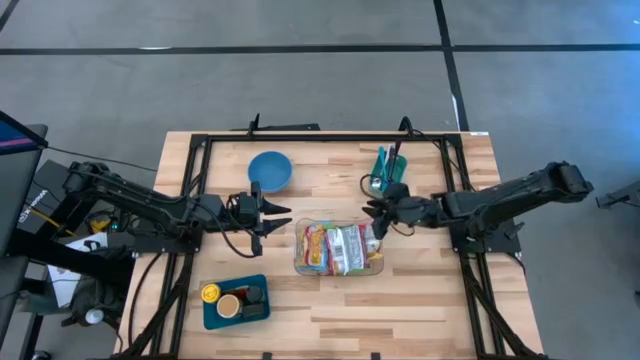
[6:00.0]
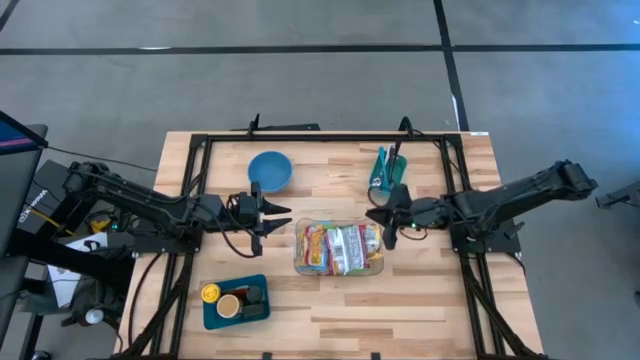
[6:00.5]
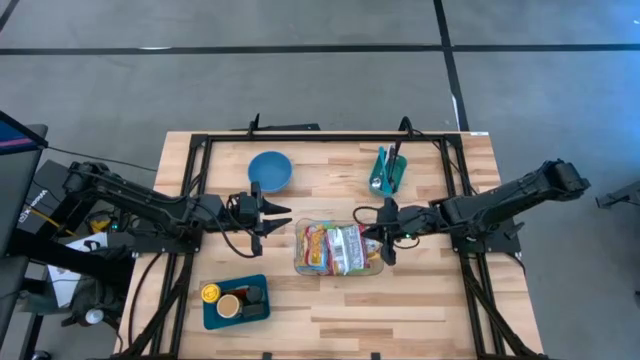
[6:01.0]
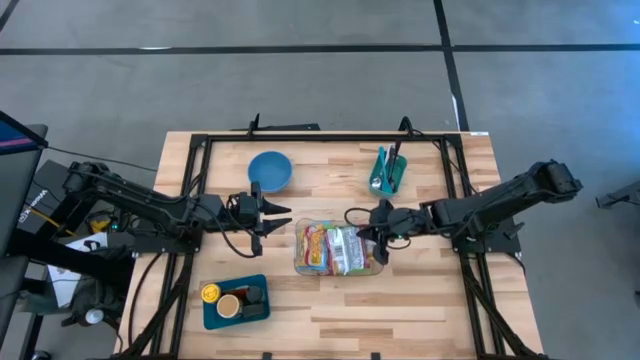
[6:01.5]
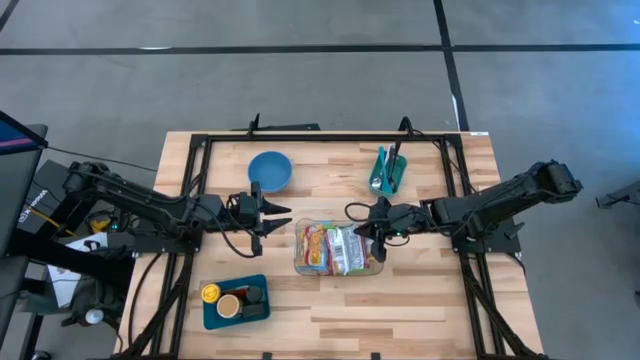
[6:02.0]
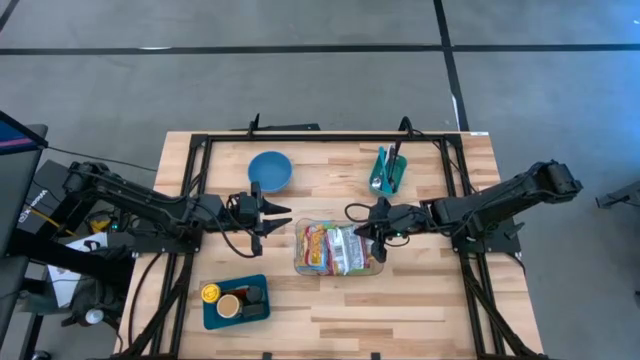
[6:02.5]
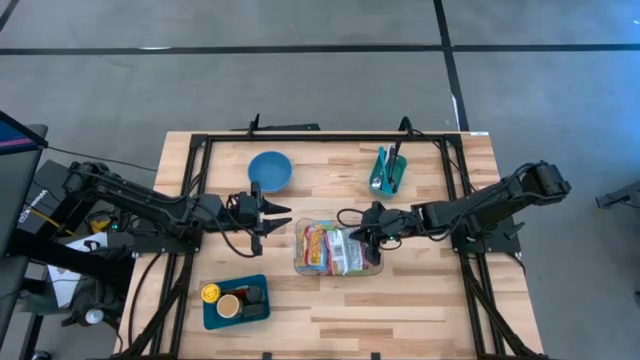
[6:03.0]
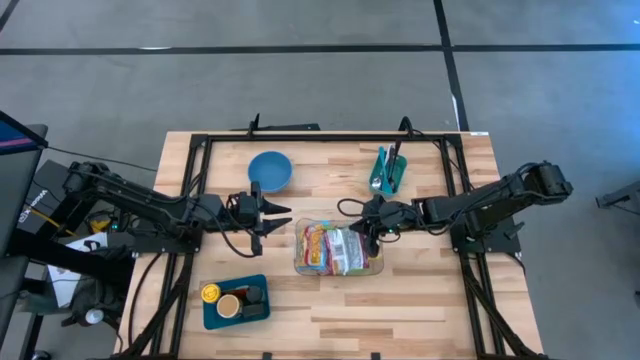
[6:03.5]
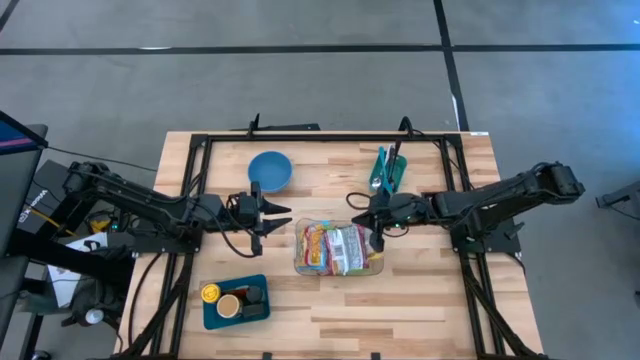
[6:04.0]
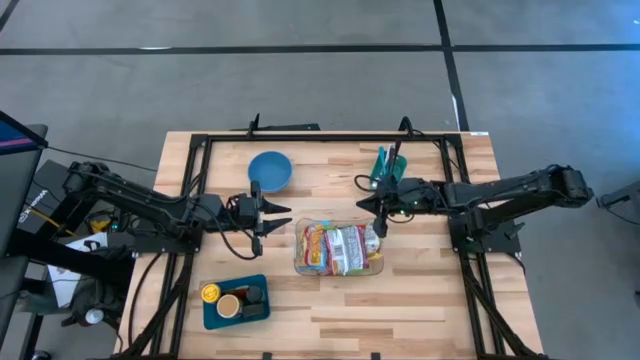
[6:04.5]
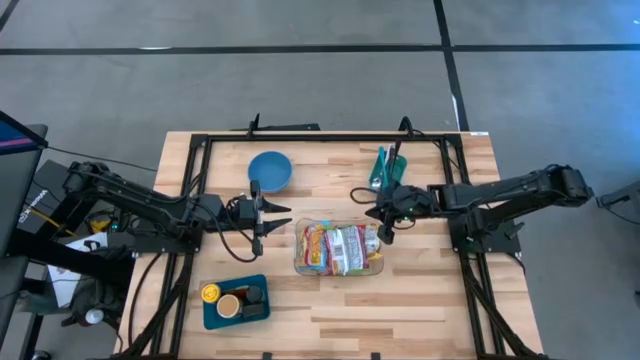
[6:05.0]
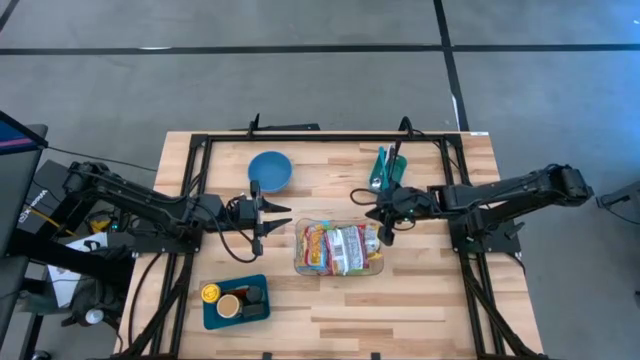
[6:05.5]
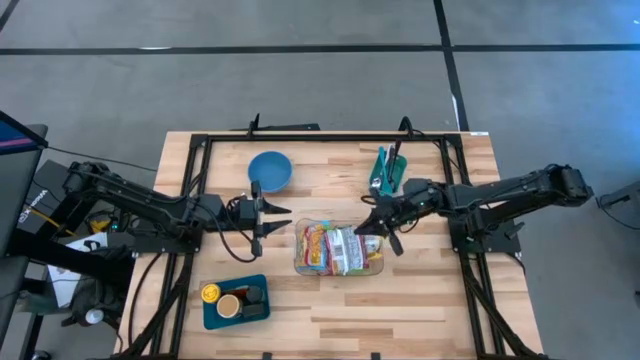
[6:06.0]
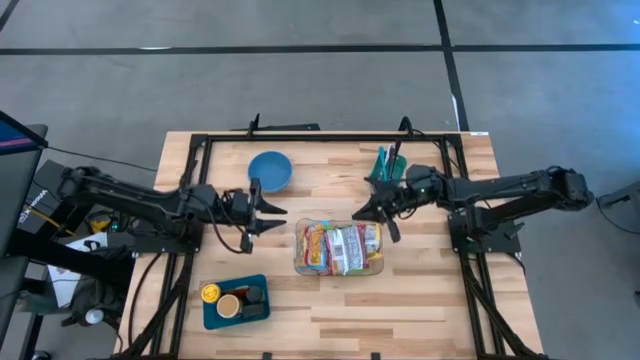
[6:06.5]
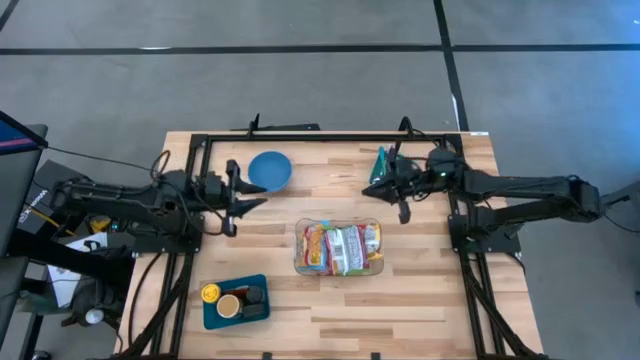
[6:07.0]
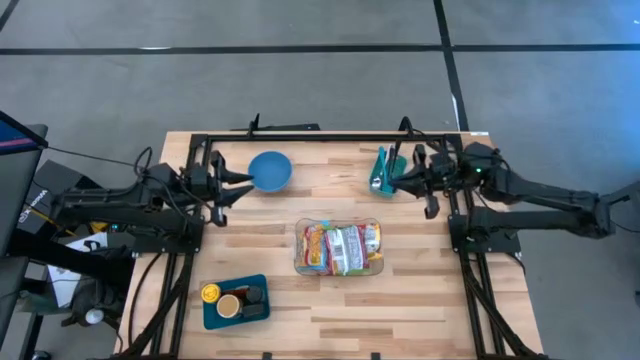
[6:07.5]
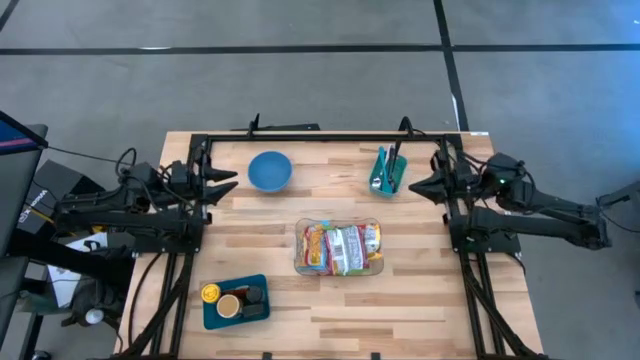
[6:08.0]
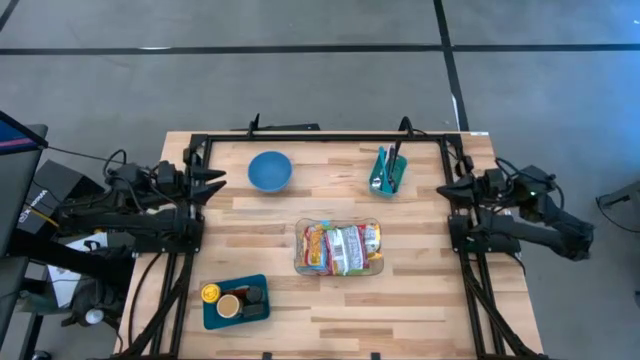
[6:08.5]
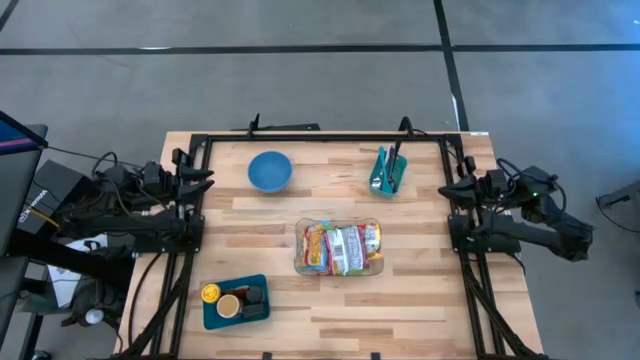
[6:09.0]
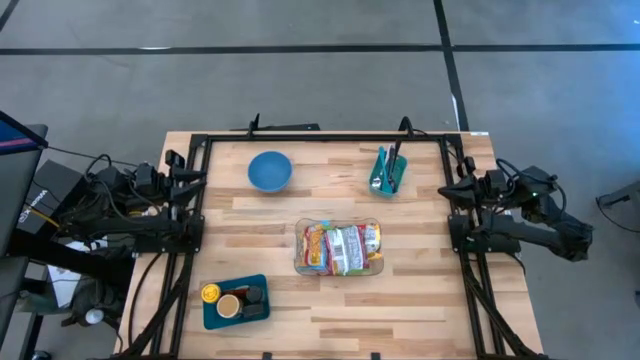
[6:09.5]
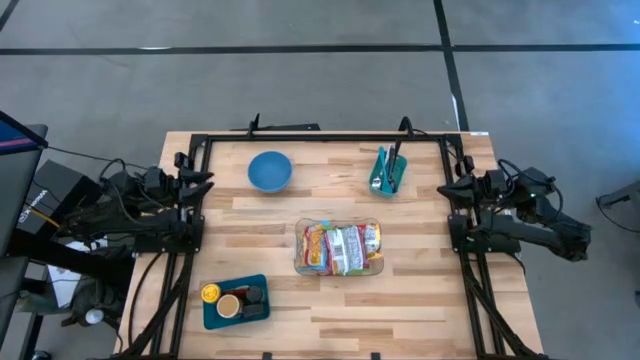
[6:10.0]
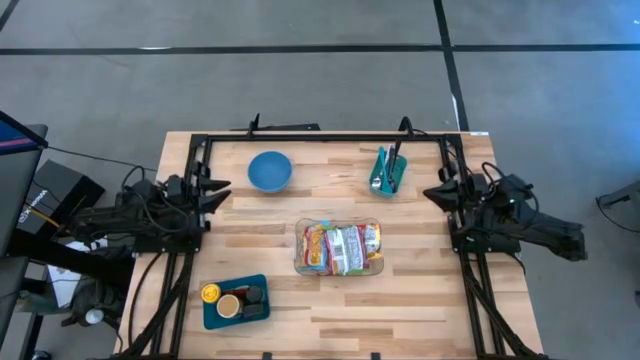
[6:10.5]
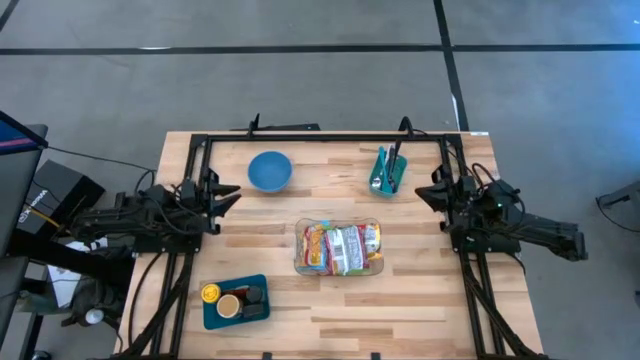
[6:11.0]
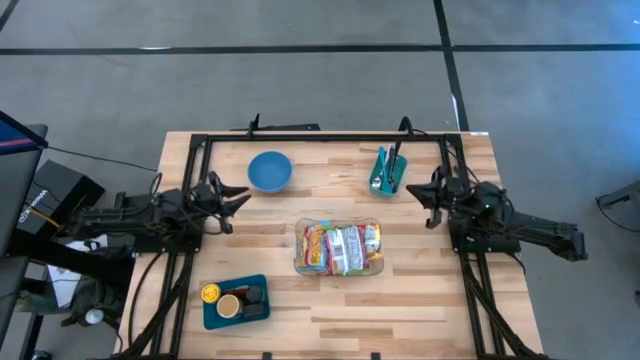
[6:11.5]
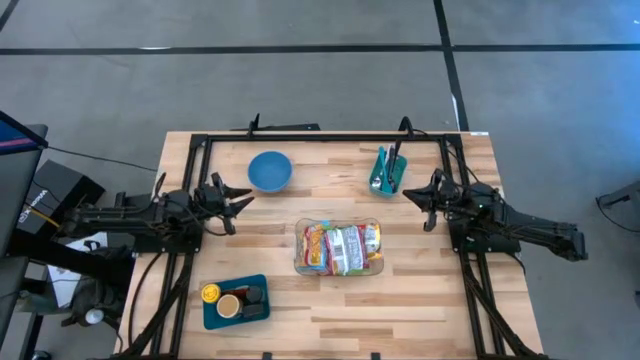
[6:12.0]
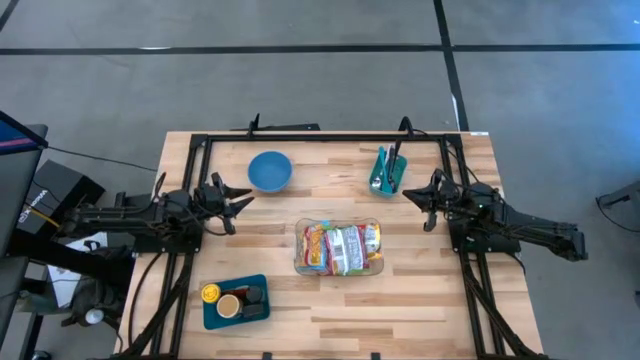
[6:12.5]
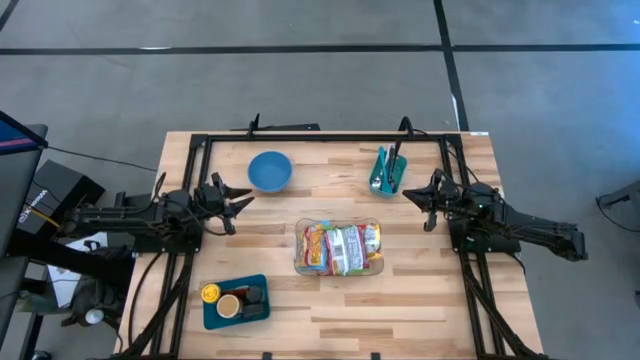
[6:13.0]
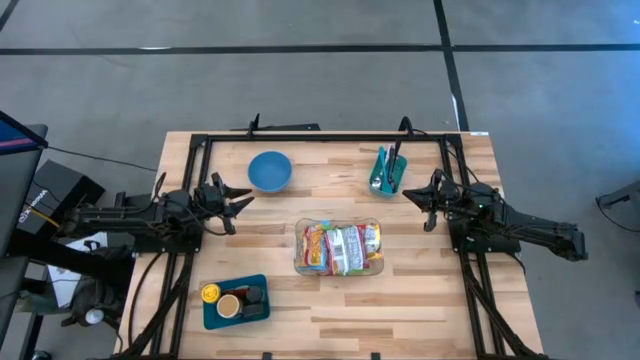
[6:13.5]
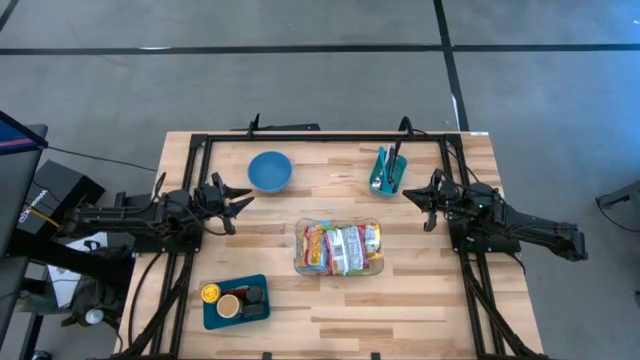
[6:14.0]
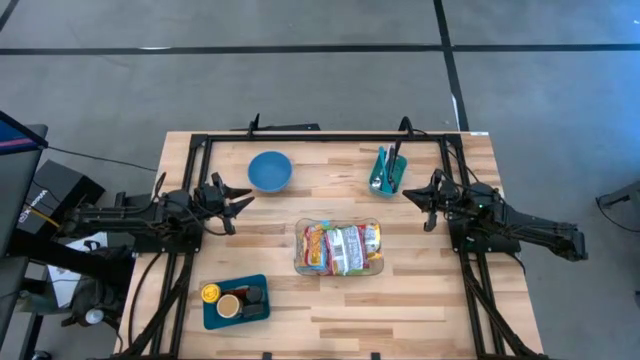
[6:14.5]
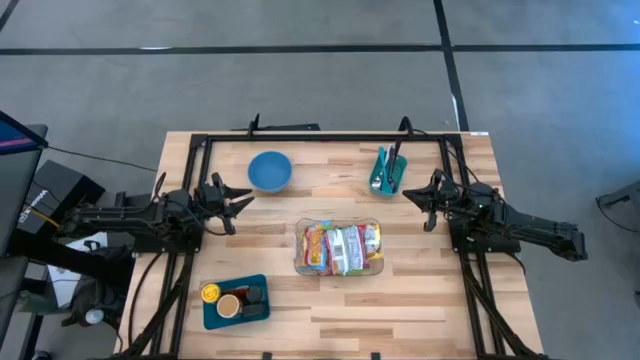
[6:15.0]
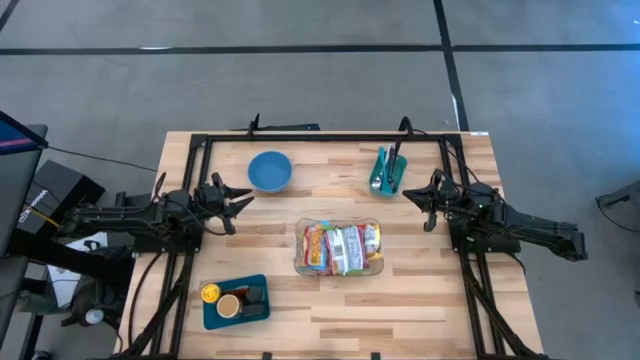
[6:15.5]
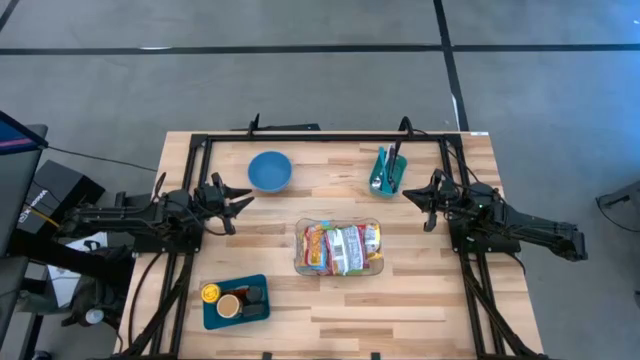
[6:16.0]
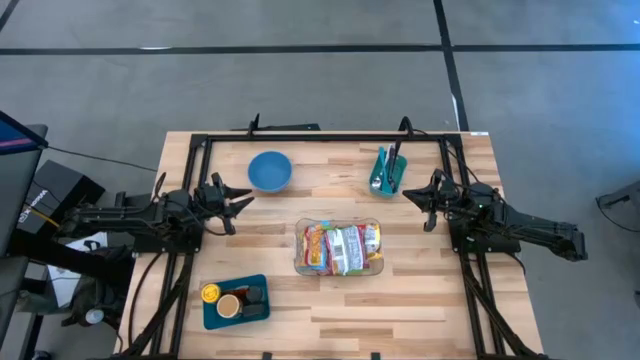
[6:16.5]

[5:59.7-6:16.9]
Task: Pick & Place Food Item
Return to Home Position

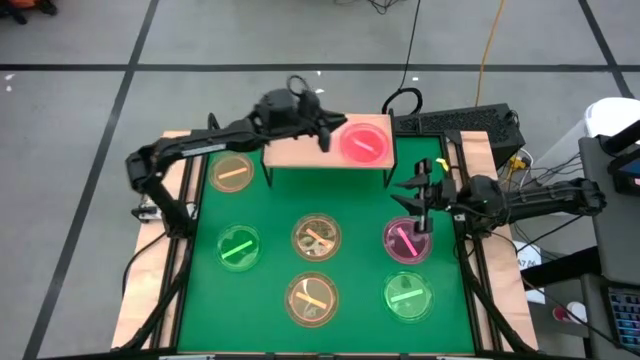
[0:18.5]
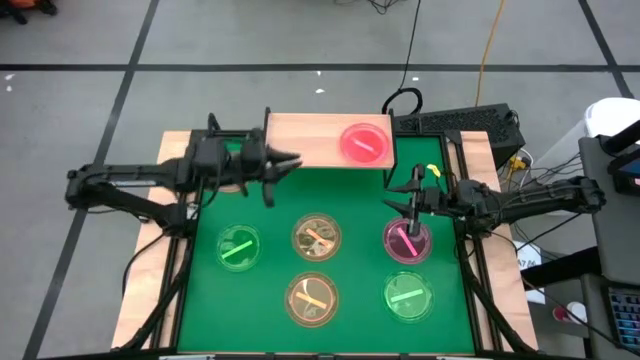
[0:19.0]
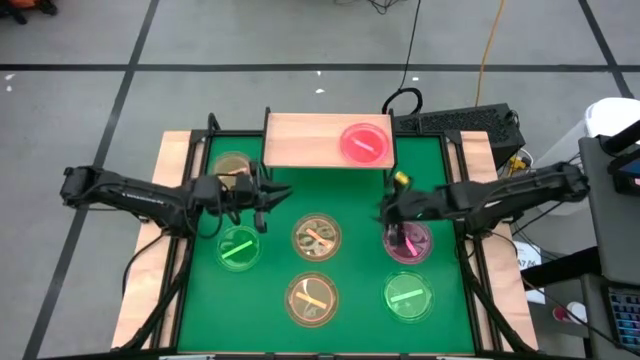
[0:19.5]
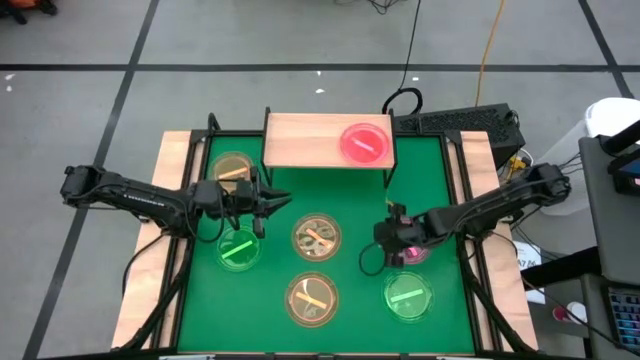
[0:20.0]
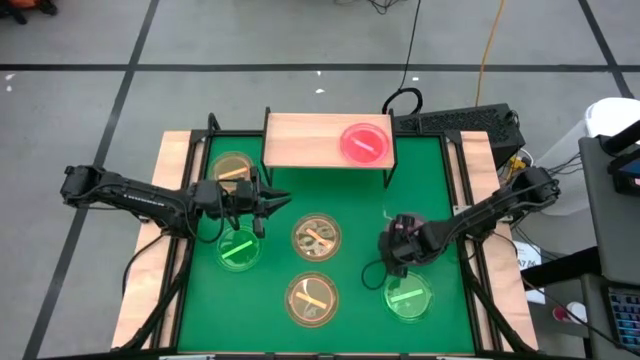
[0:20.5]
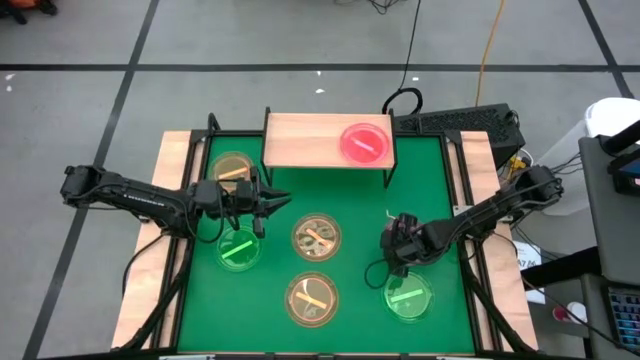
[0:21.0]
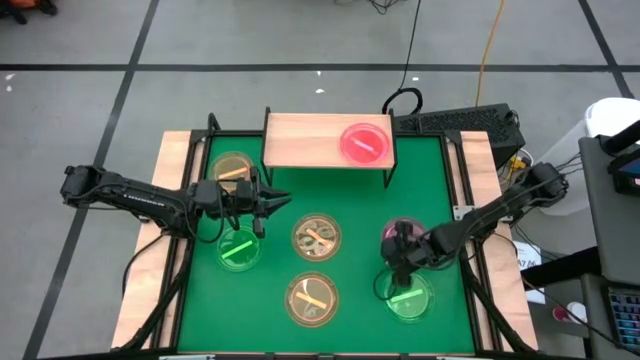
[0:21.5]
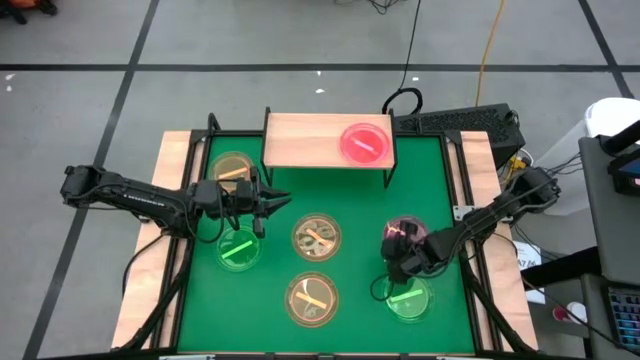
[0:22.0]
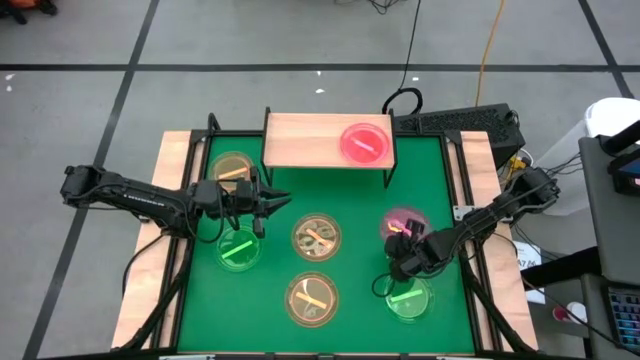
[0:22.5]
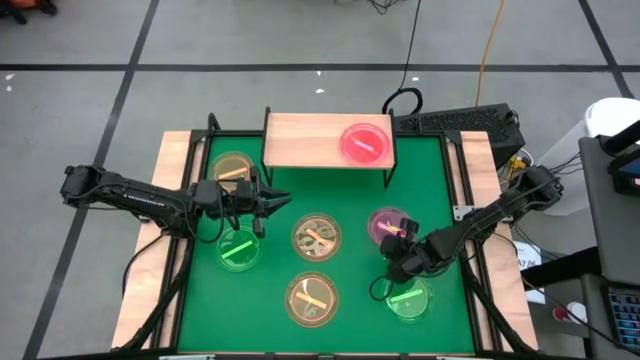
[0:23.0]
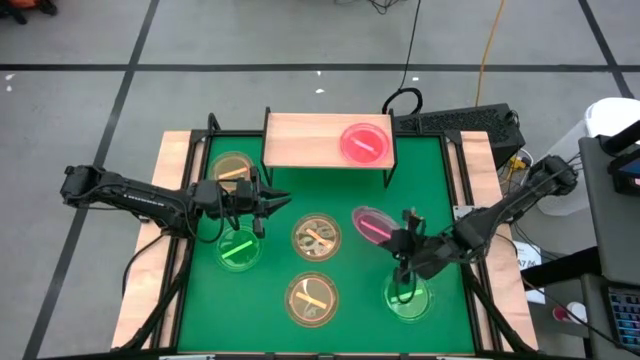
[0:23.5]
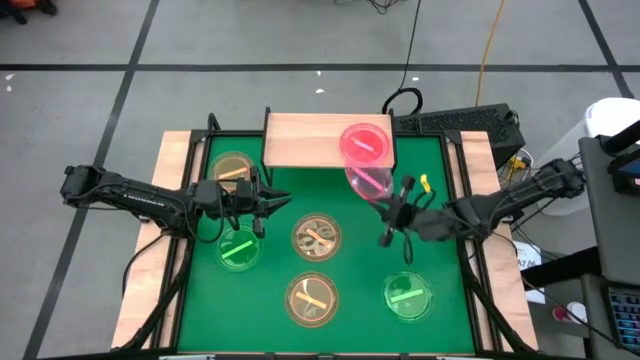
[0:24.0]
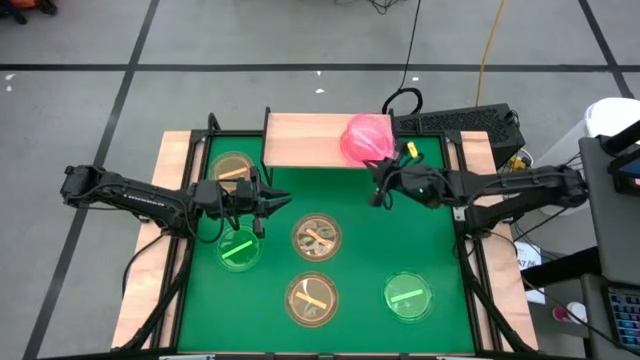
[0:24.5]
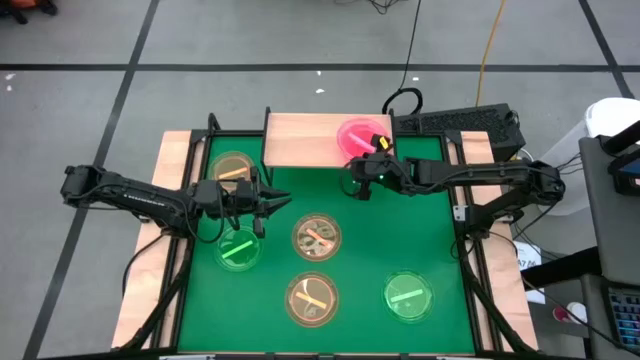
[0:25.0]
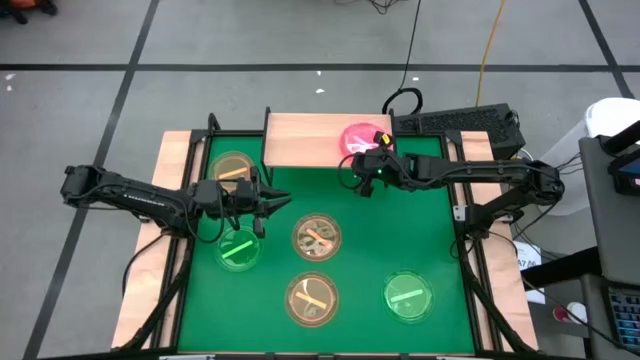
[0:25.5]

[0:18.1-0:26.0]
Task: Place and stack plates onto a shelf
Stack the pink plate on top of the pink plate on the shelf
